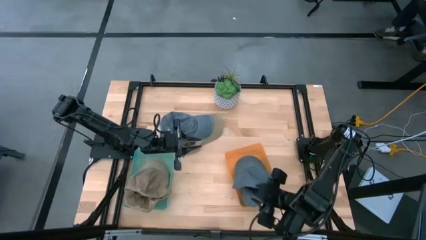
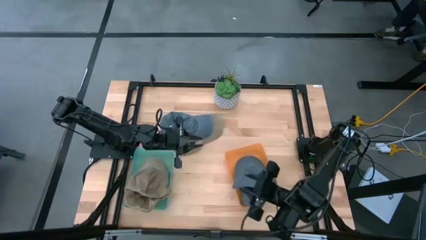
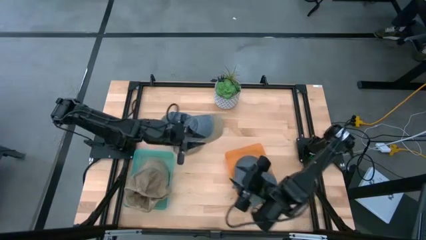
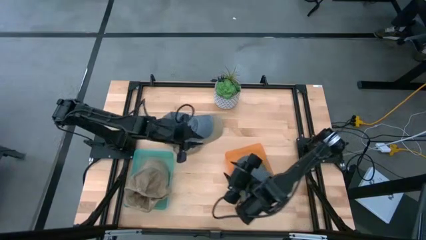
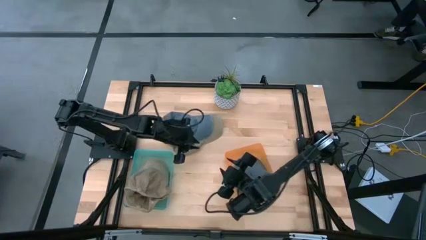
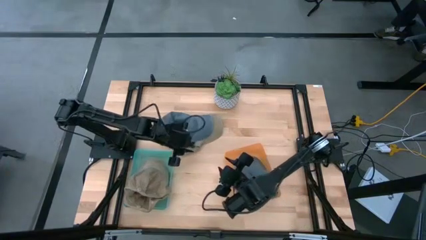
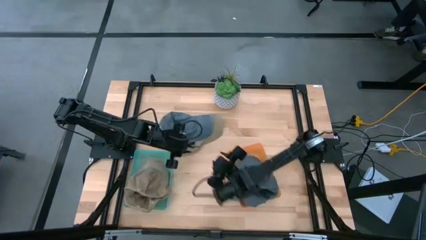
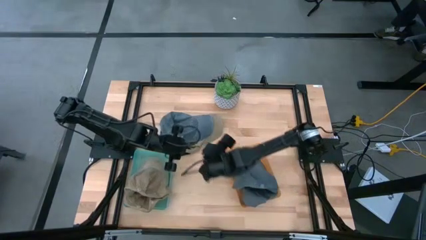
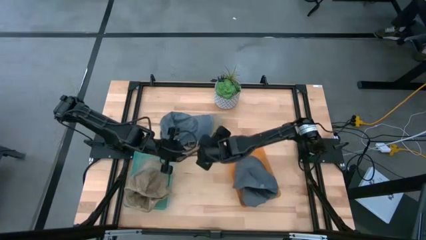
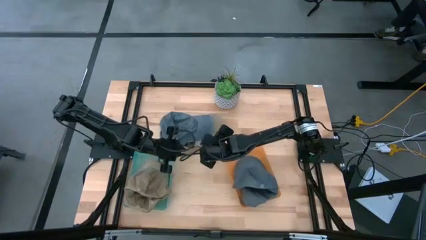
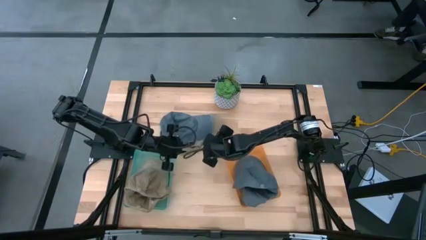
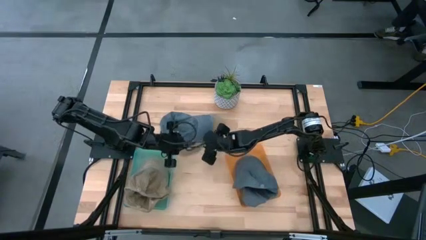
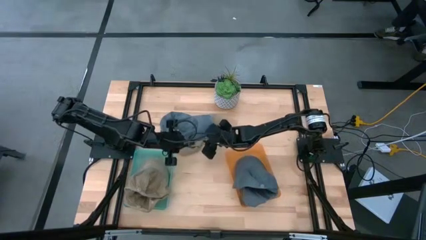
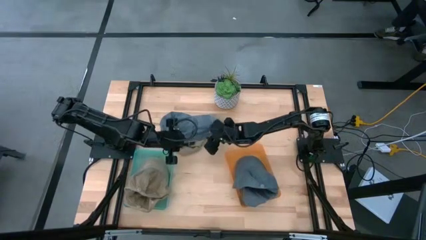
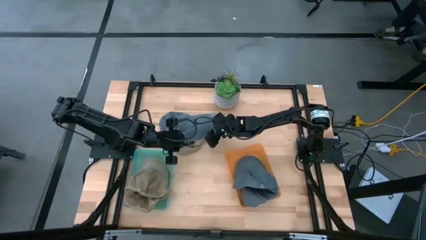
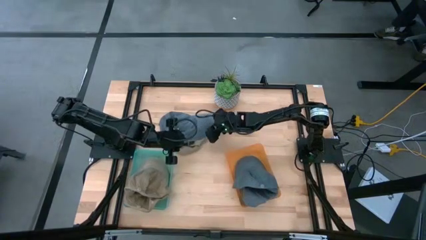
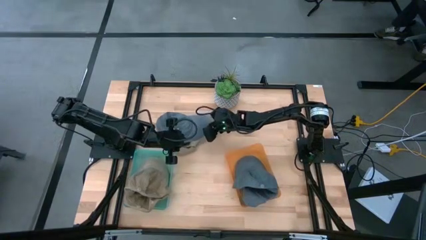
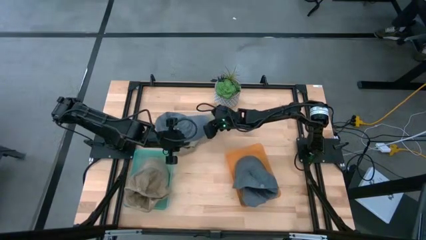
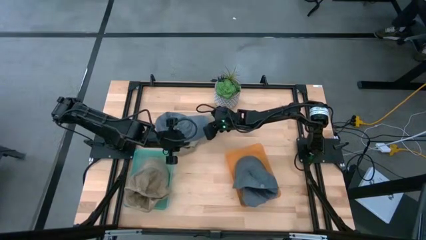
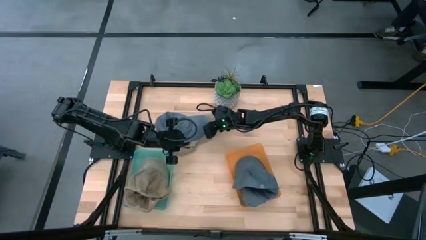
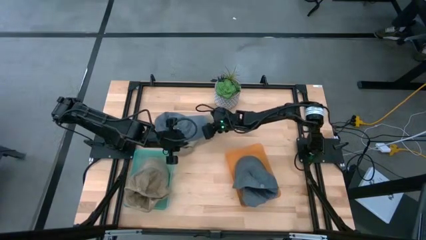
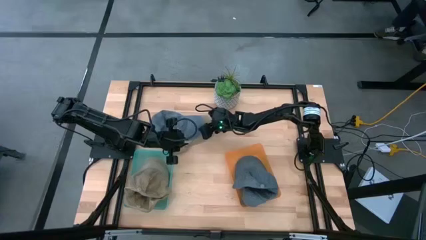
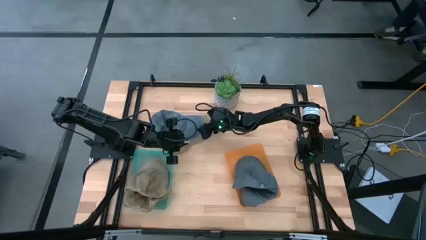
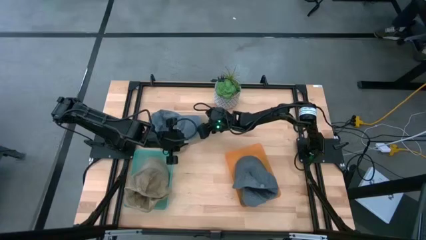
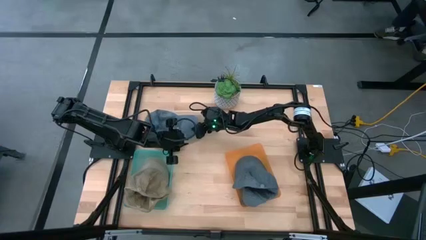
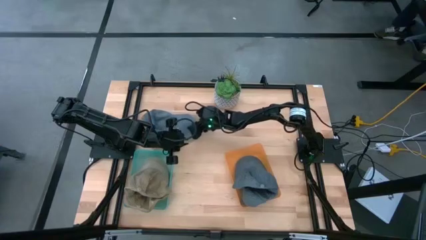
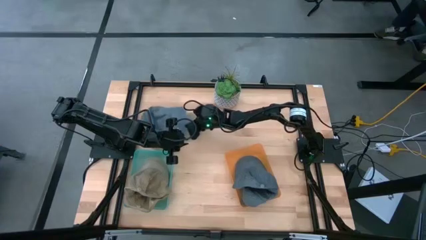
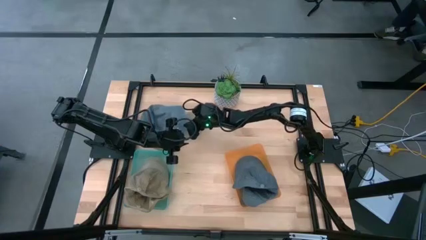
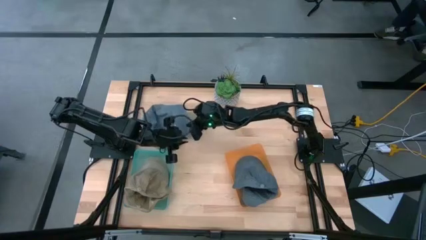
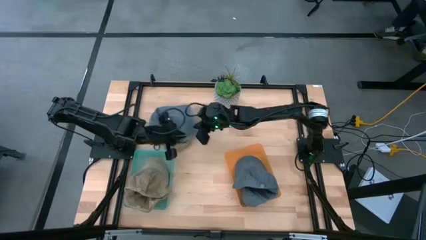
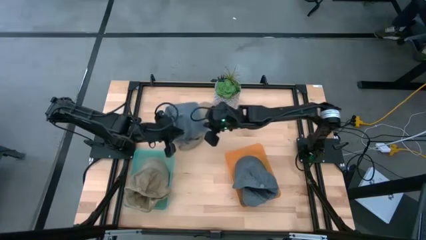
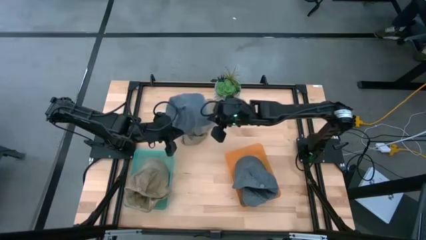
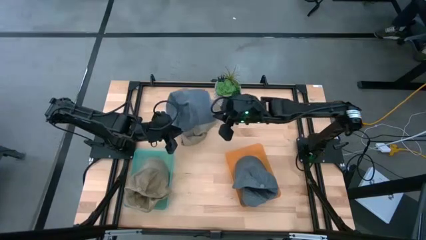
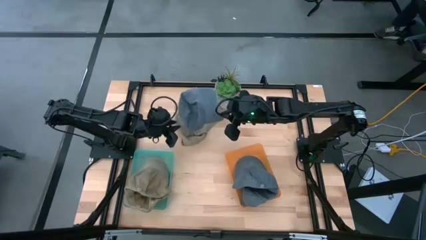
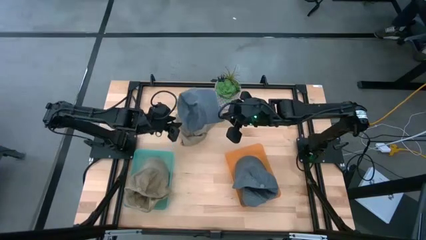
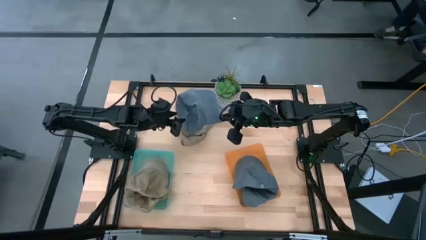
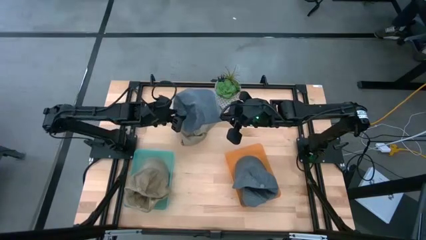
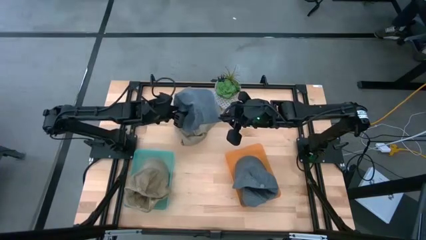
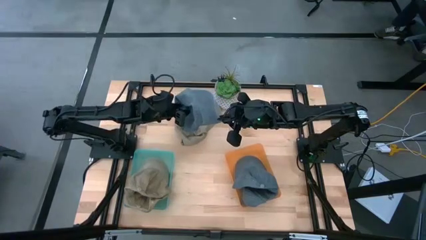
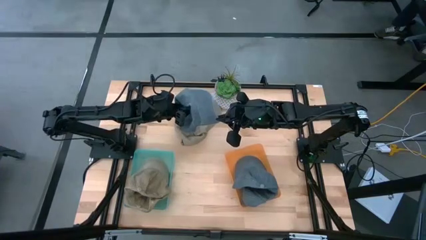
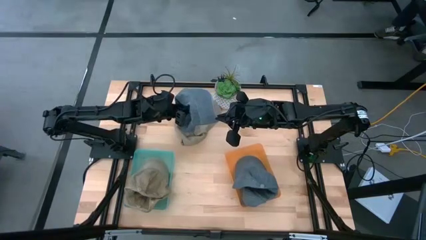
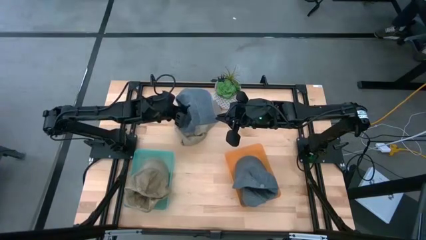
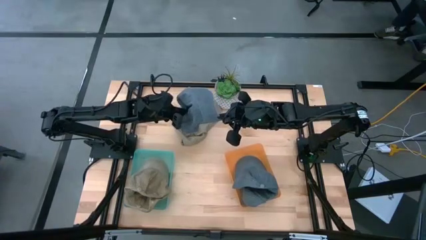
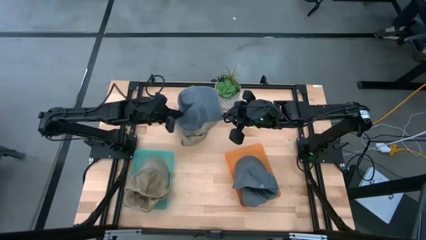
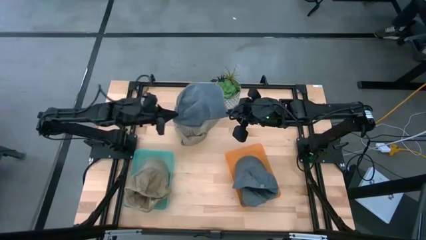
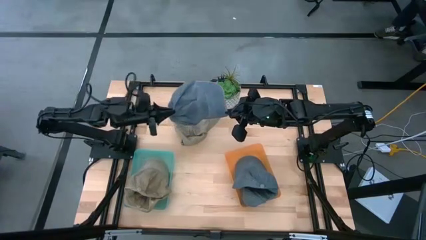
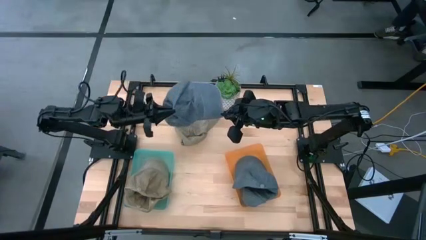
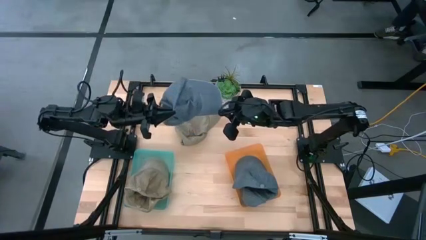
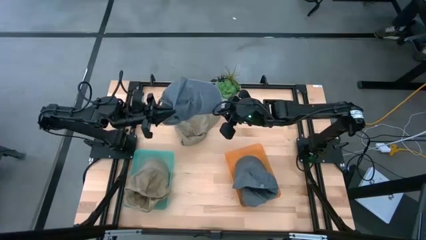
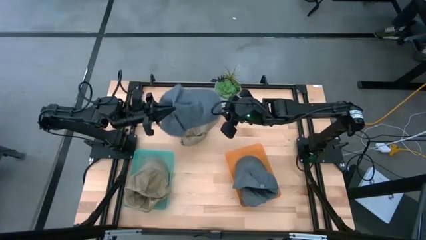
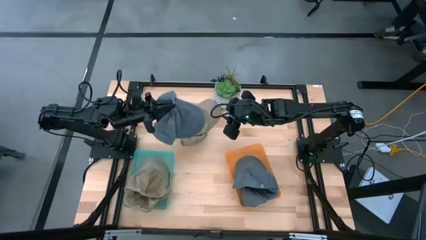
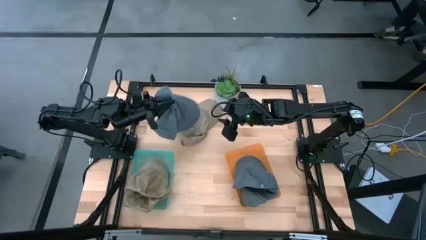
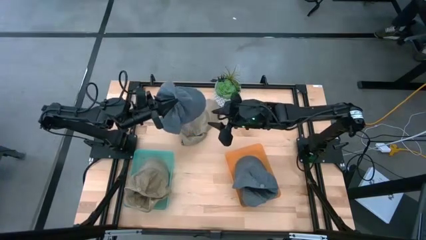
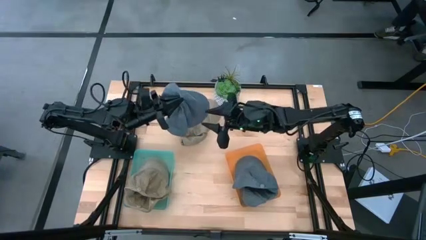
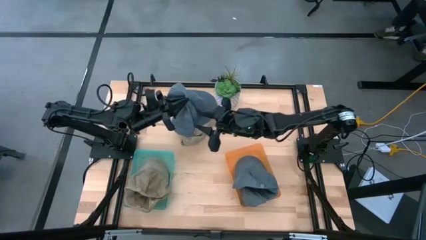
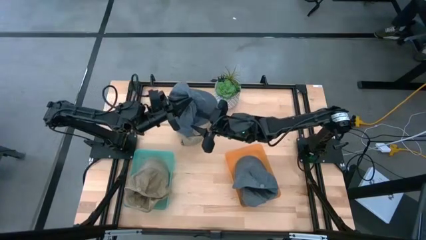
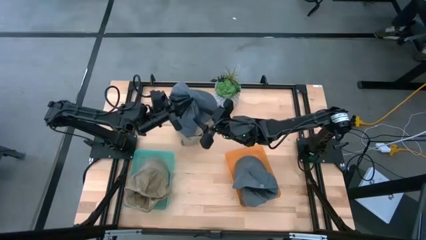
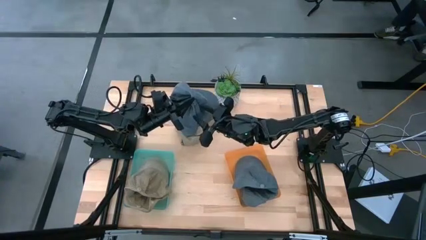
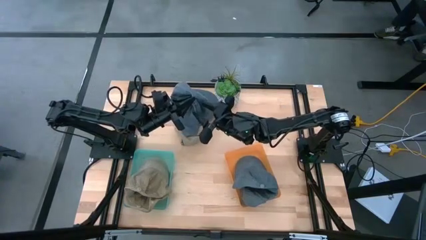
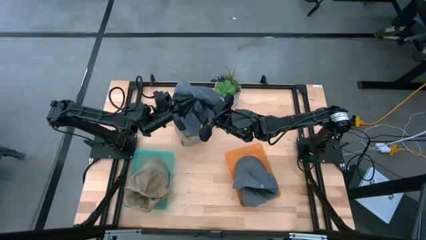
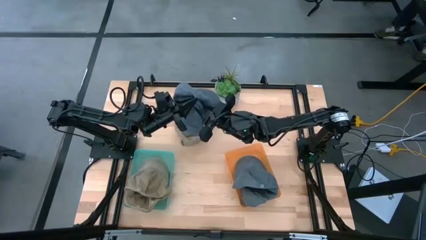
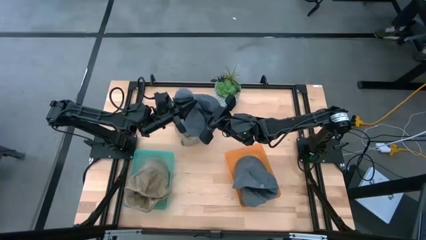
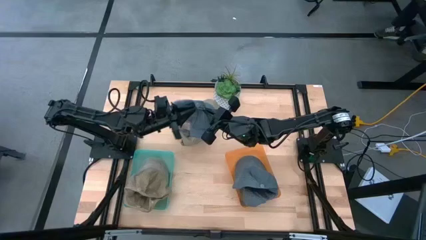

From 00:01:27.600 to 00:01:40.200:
Task: Pick & Place hat
Put the blue cap into the orange bin

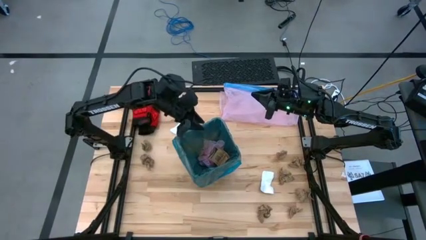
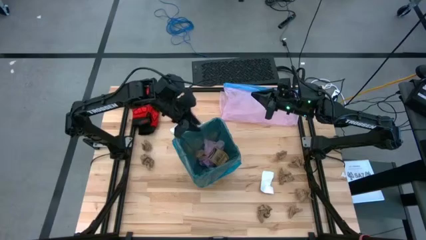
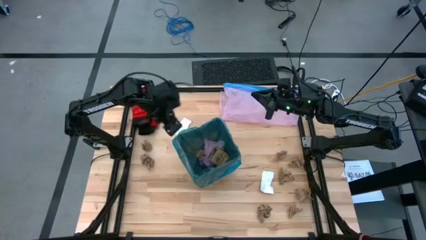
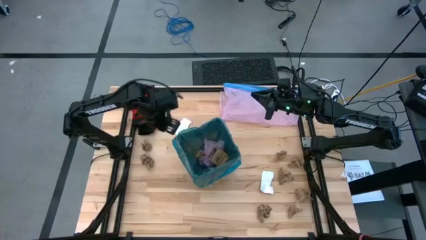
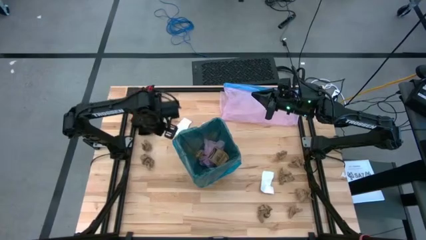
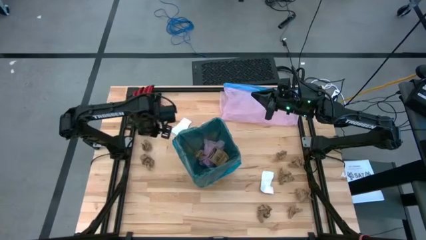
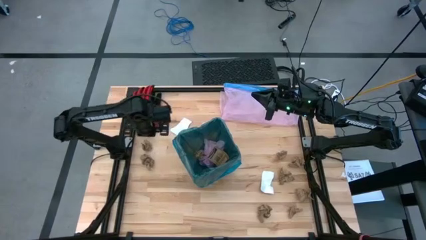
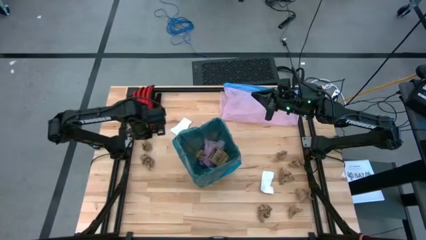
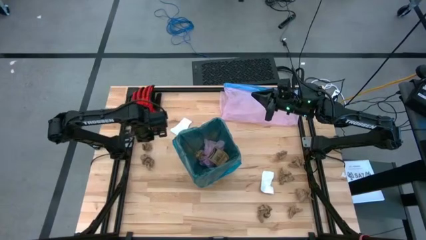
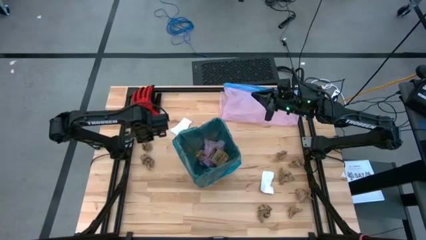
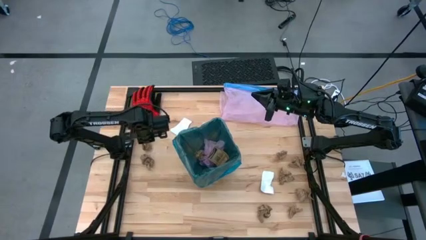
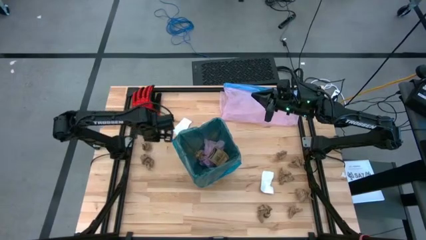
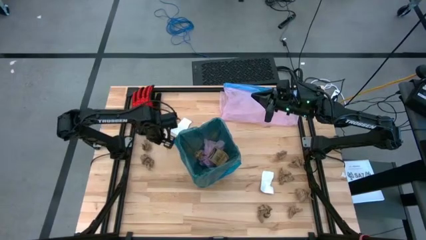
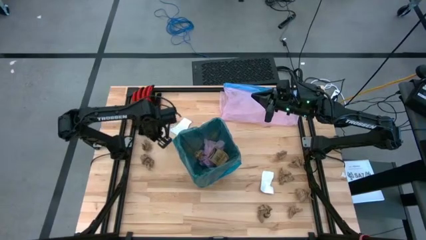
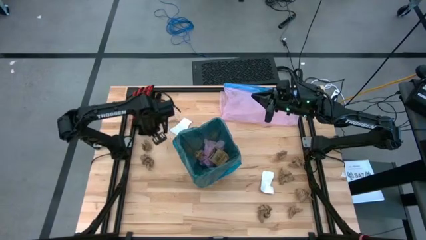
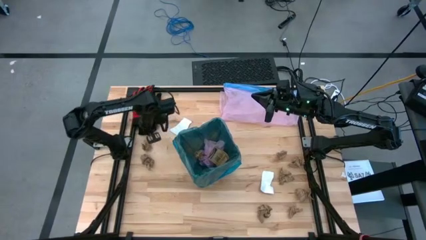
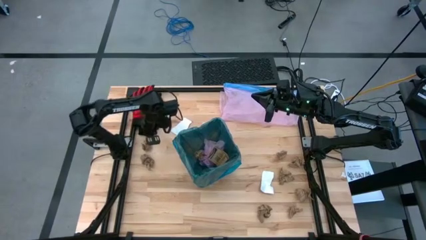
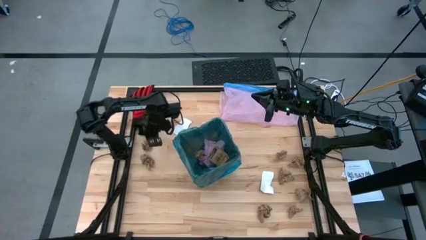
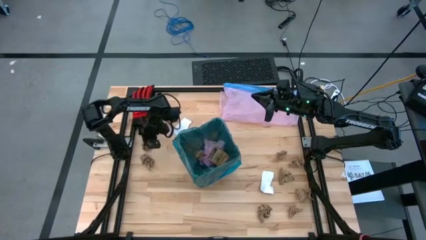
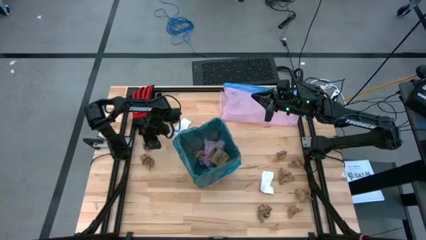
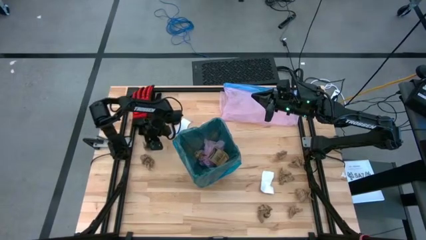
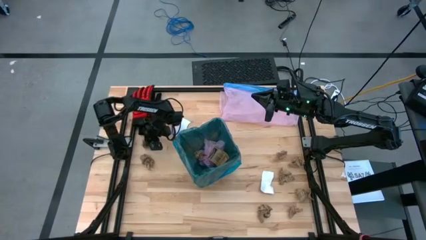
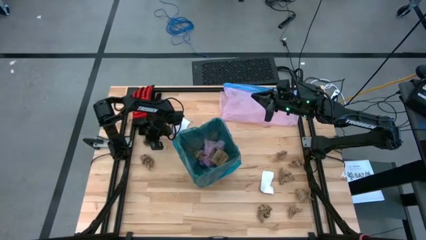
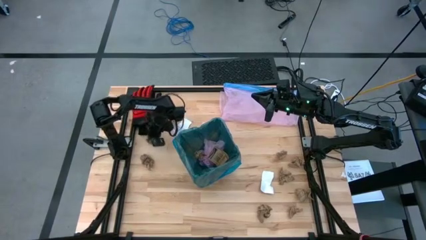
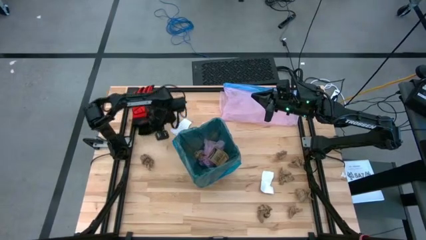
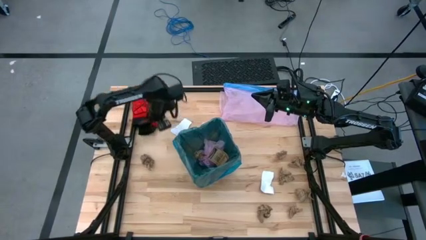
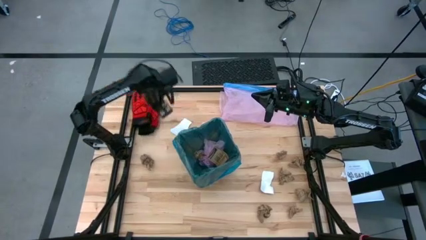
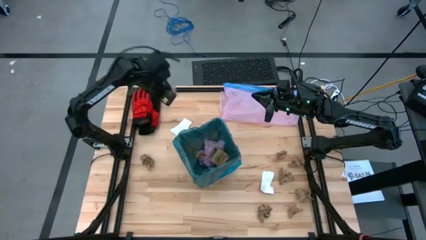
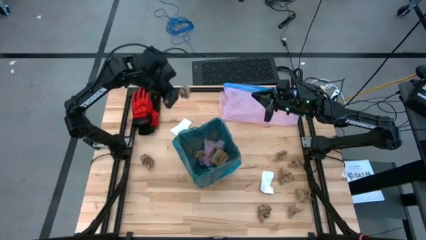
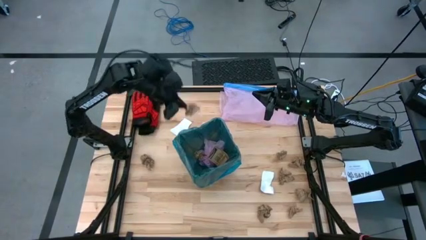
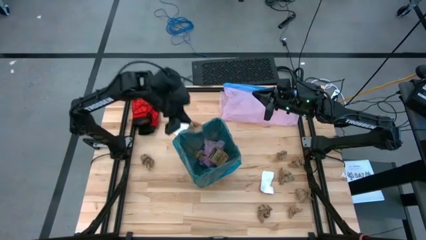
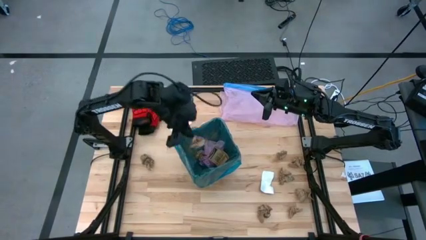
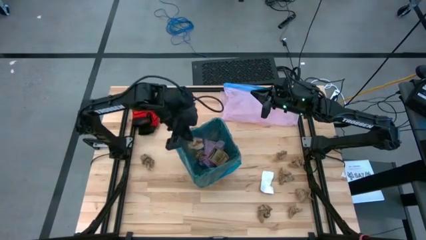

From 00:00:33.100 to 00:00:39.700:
Task: place trash/remove bag and relplace
Put the brown napkin into the black trash bin
